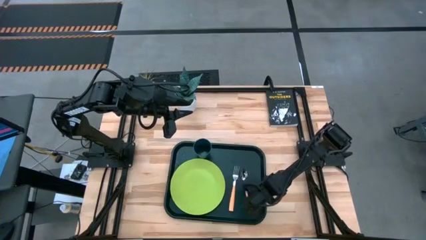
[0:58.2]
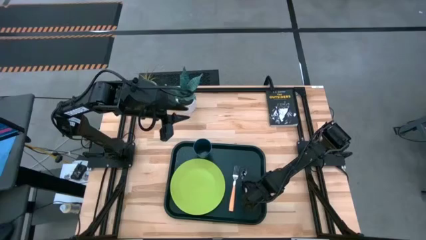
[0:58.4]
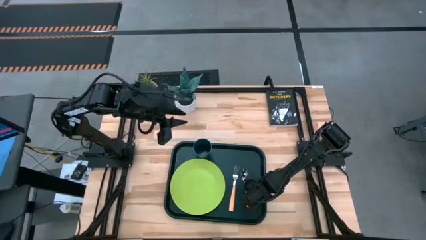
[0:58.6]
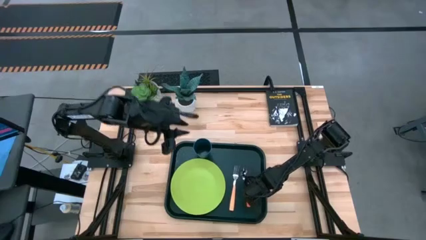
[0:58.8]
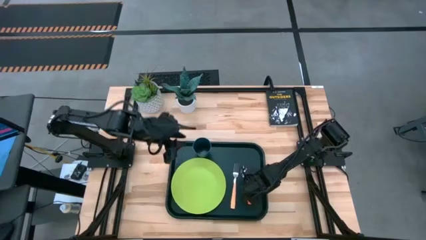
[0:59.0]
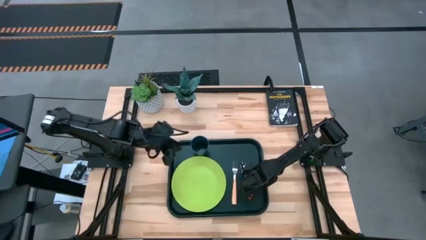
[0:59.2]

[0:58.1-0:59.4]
Task: Pick and place plate/cup/fork/spoon on tray
Adjust the black tray

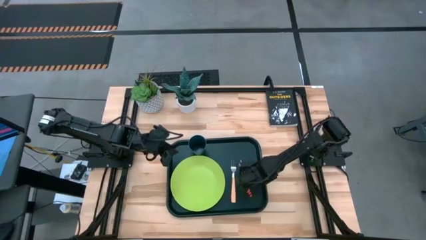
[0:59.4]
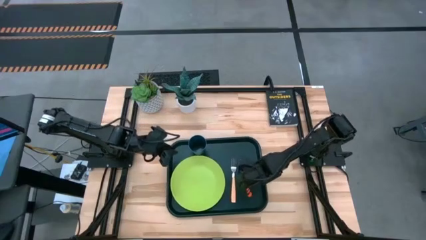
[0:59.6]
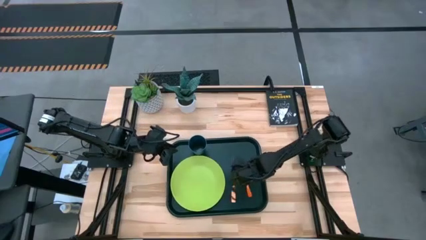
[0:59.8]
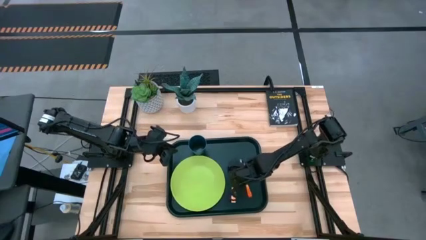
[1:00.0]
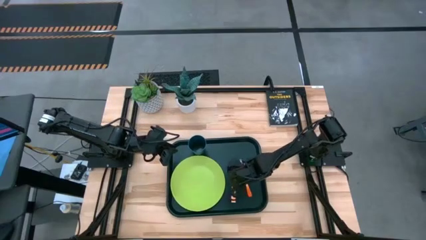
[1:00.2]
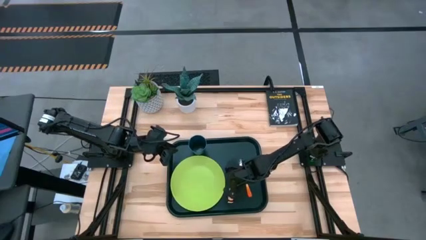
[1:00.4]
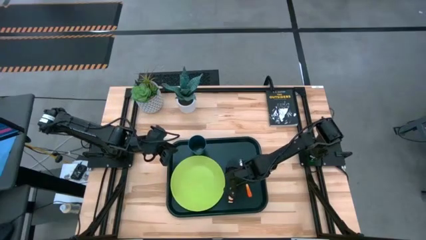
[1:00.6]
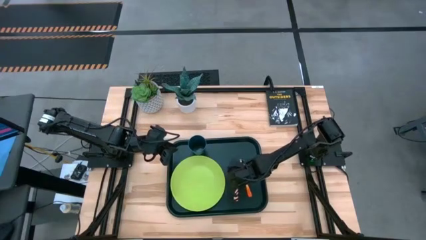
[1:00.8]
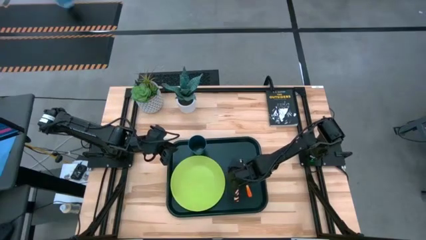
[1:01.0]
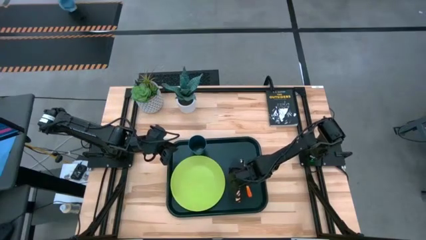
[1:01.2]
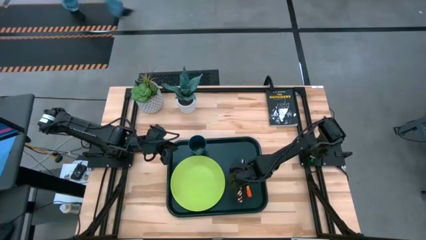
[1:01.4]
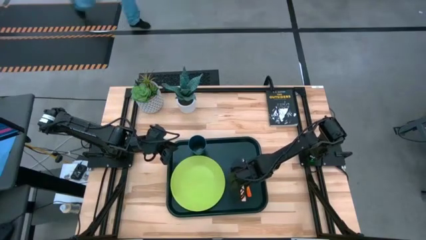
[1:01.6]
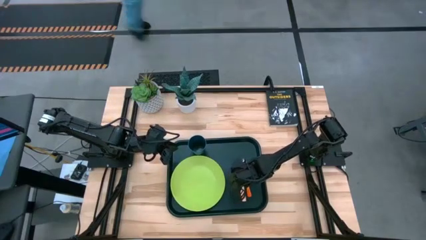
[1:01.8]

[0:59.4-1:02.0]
Adjust the orange fork

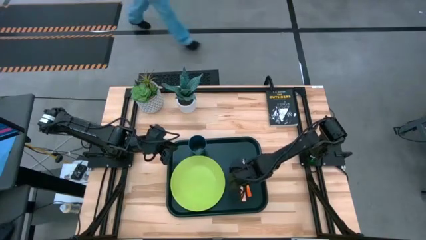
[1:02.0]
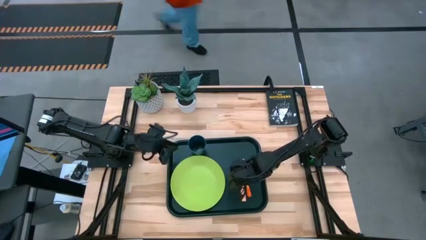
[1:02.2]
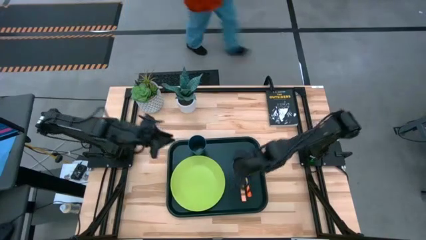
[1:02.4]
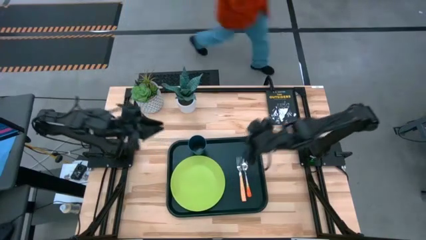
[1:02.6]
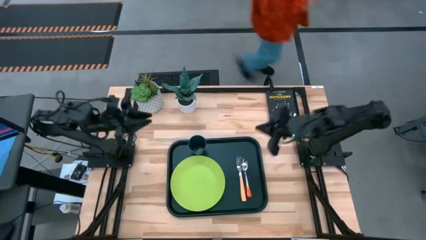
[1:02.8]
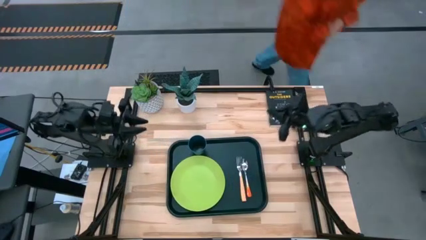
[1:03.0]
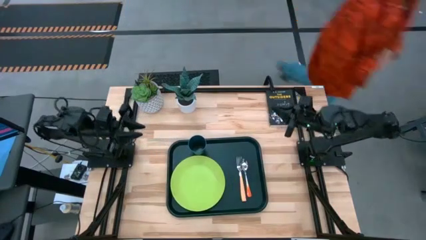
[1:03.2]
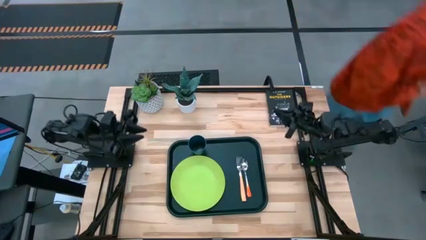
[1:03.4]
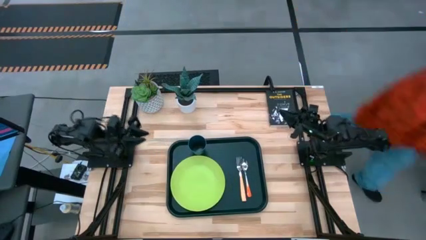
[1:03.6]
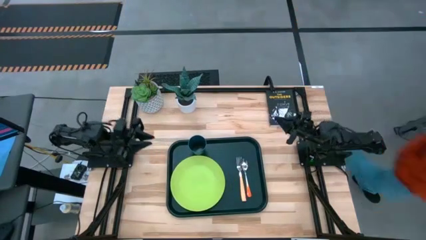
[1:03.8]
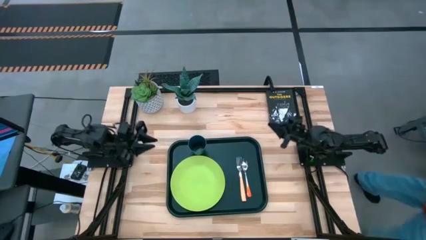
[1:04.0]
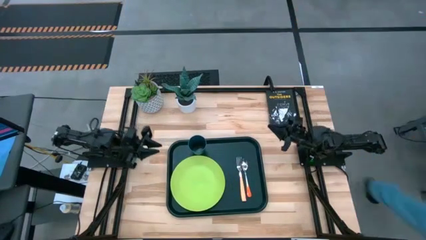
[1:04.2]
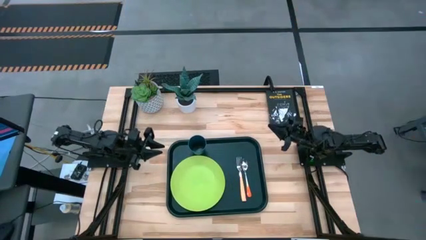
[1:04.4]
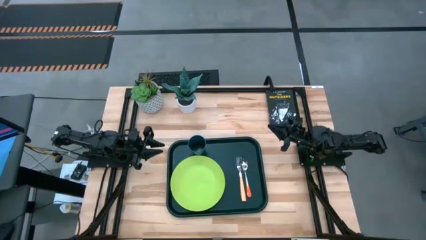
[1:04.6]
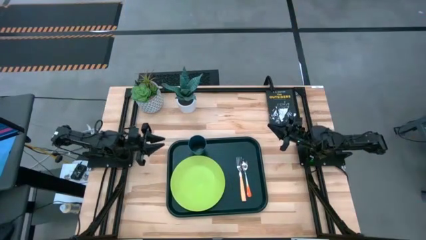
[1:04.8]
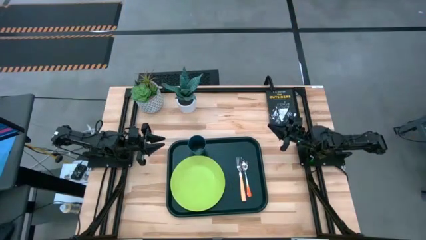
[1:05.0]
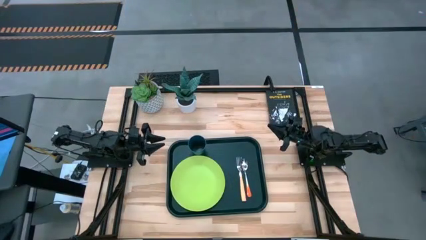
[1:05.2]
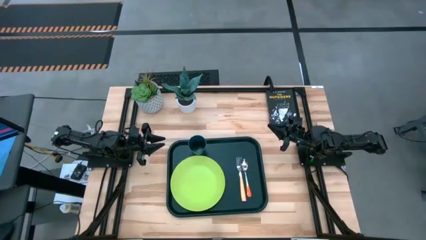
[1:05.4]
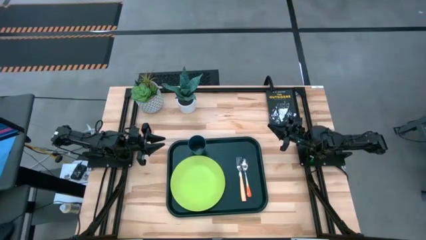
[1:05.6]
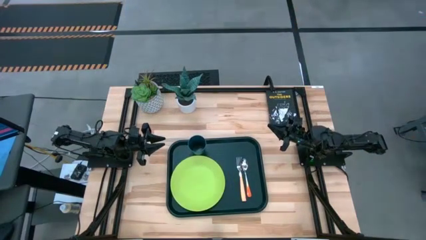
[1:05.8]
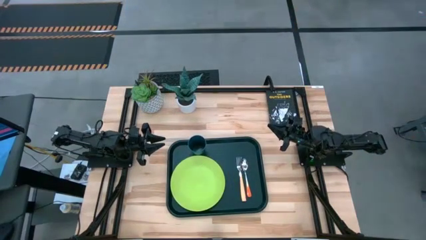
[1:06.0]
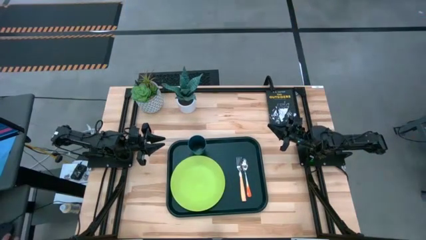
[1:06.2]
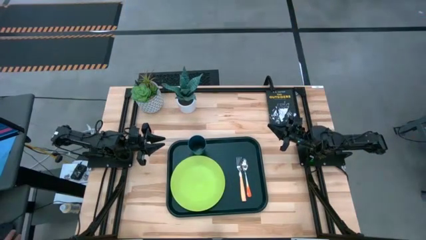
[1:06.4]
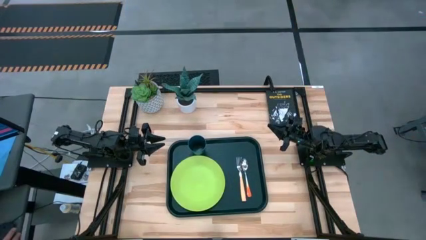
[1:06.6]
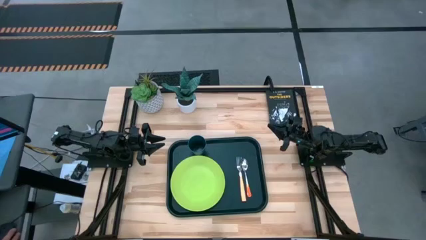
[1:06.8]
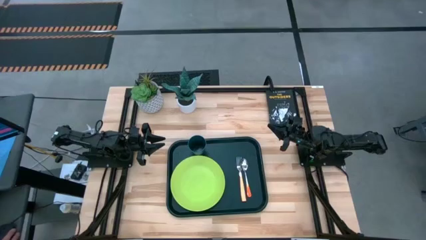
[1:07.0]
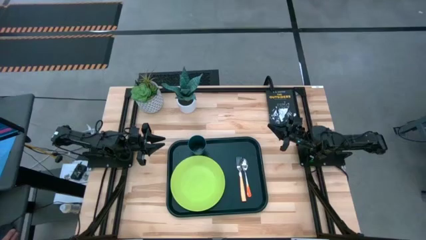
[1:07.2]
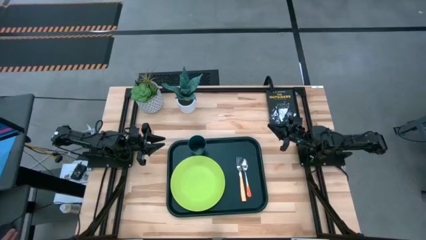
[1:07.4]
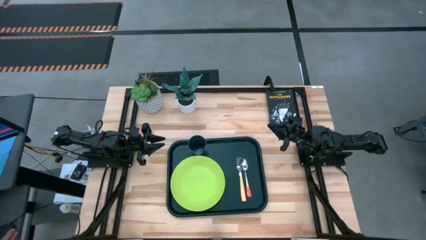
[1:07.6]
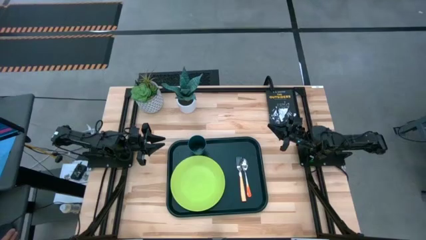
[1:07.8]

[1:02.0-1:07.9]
Return to Home Position
